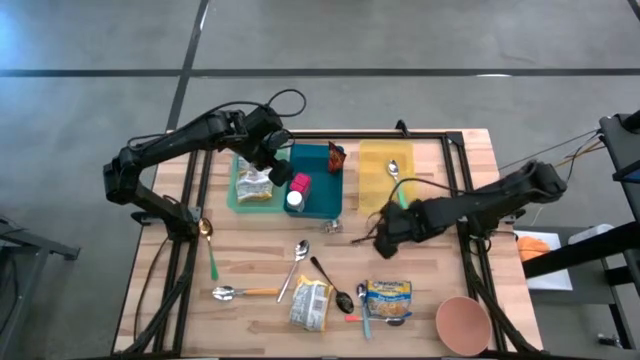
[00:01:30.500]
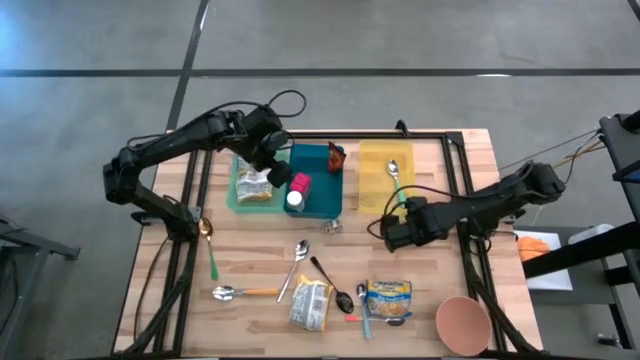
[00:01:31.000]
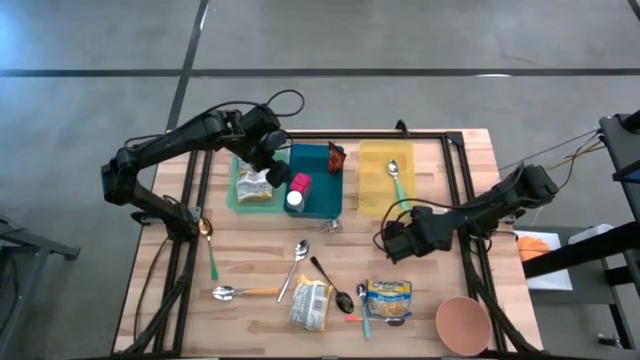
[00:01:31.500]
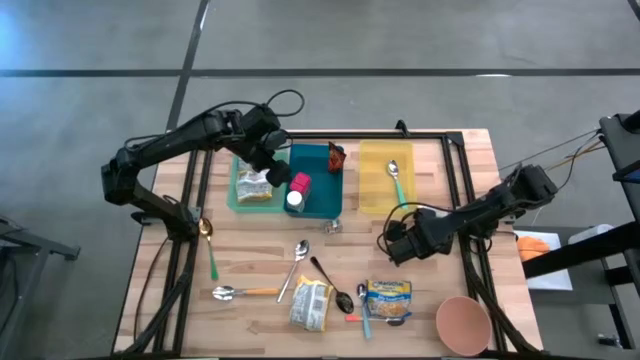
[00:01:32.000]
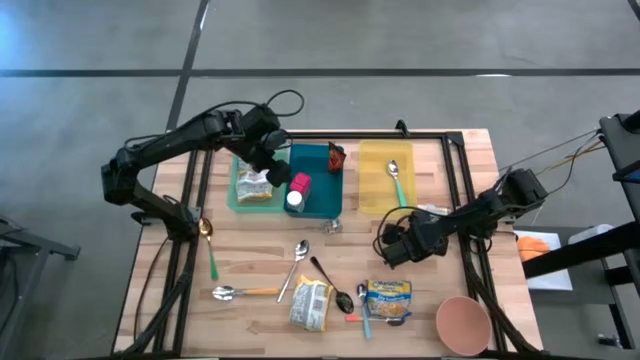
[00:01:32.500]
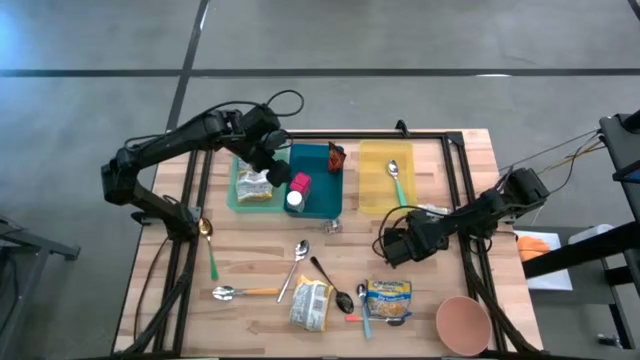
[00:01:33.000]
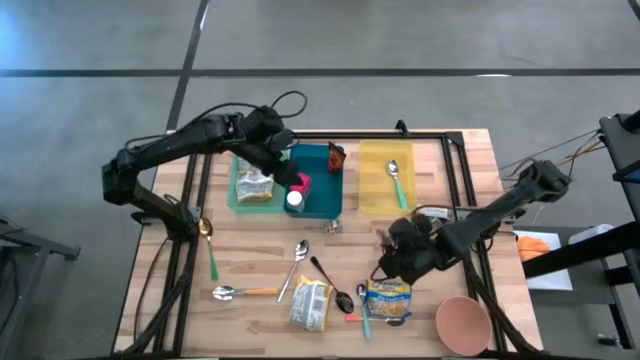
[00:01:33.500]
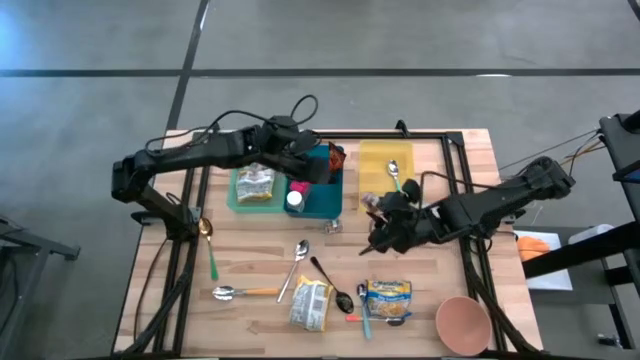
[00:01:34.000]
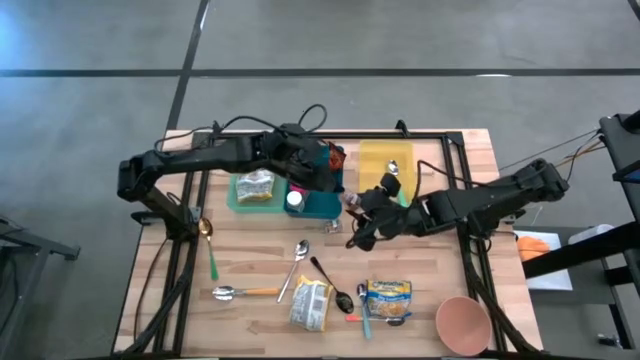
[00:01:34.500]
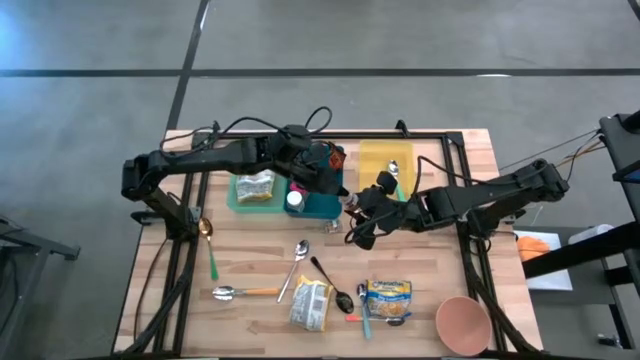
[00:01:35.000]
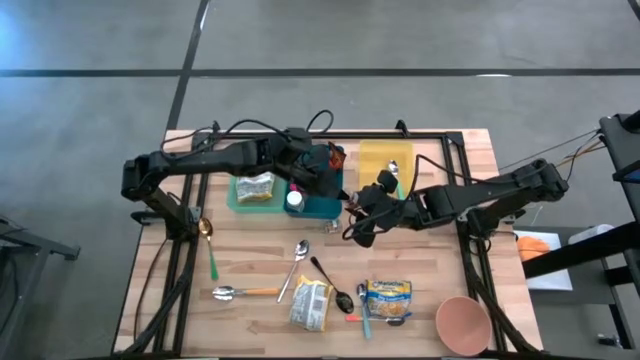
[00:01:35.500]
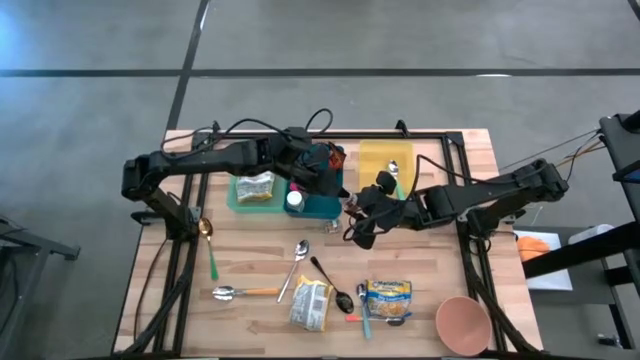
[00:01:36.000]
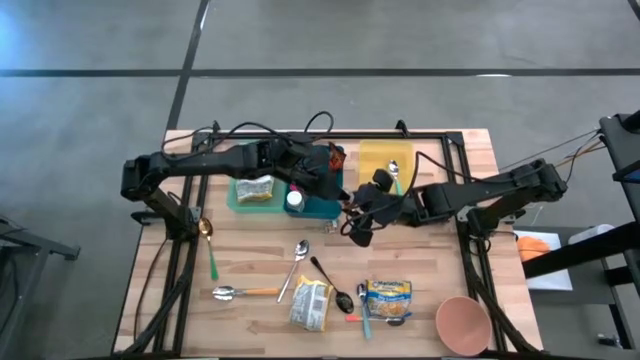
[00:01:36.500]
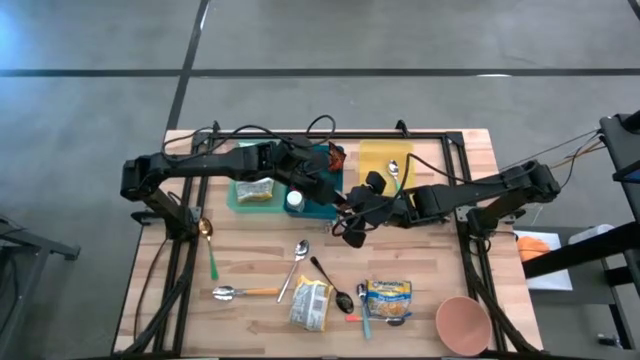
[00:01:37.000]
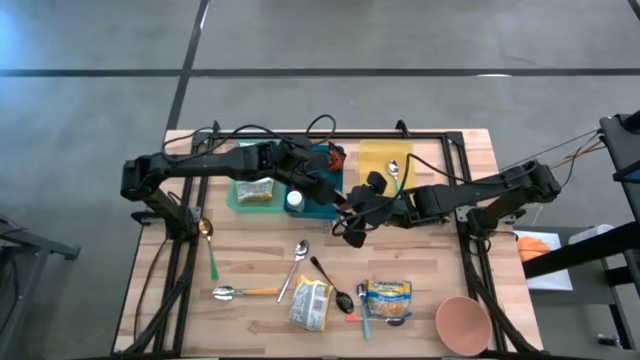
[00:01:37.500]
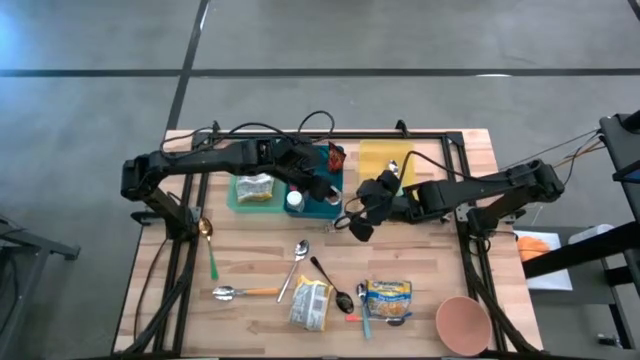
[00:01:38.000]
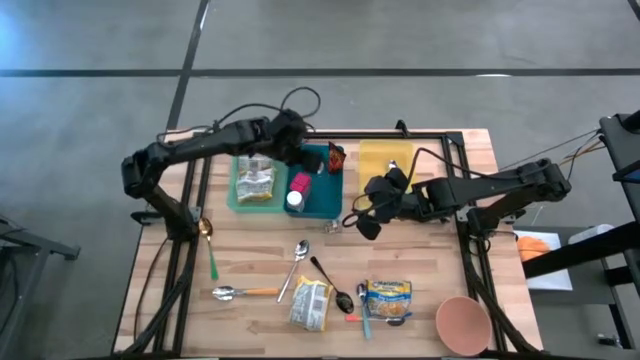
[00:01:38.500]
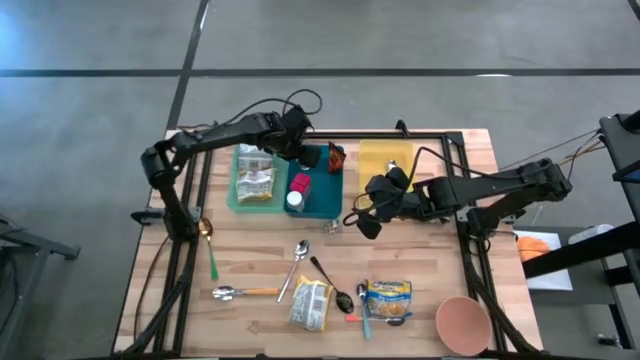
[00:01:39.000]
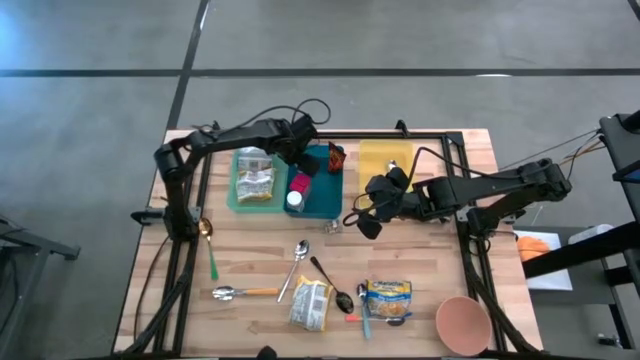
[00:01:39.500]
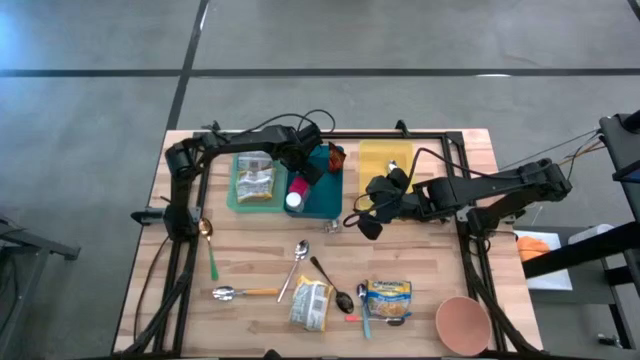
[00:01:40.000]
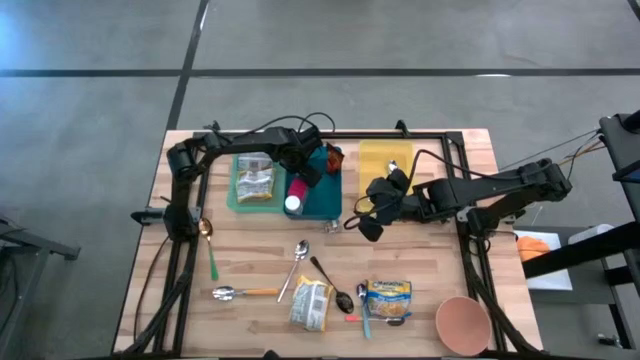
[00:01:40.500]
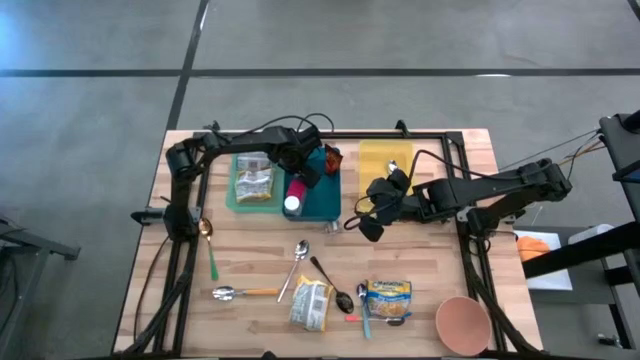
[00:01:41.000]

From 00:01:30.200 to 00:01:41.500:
Put the right brown seasoning bottle into the blue bin

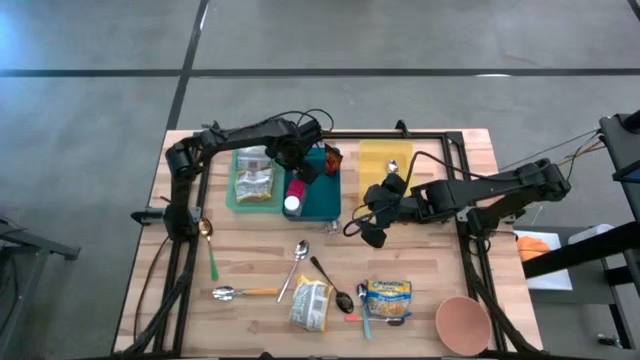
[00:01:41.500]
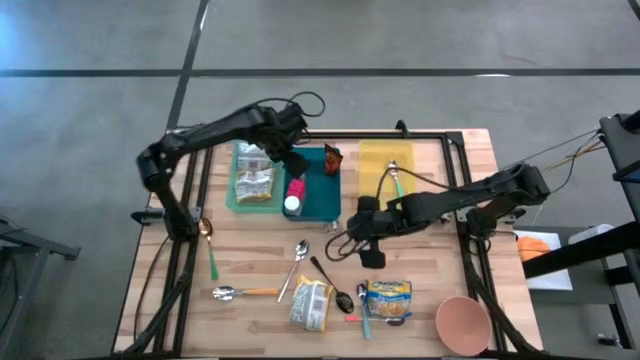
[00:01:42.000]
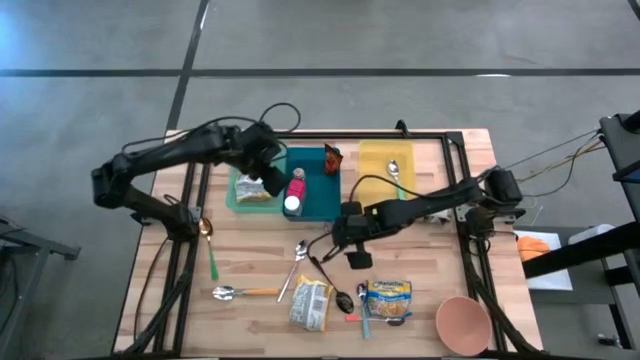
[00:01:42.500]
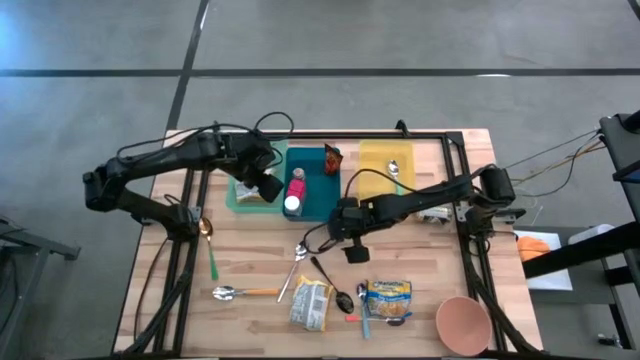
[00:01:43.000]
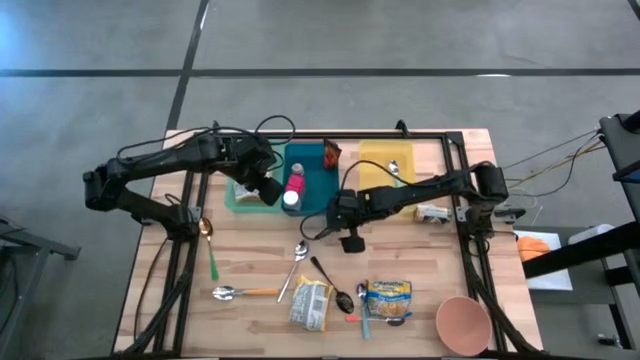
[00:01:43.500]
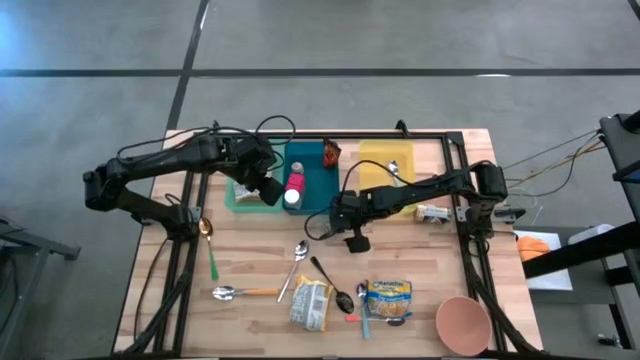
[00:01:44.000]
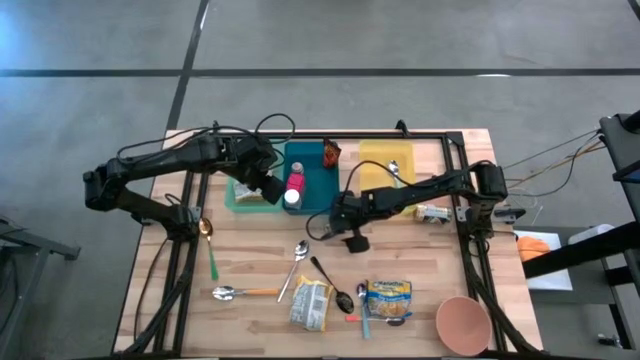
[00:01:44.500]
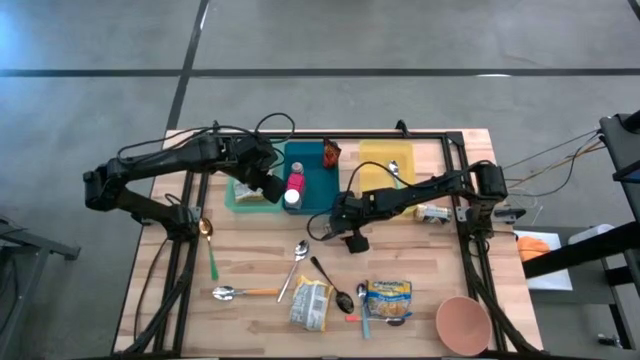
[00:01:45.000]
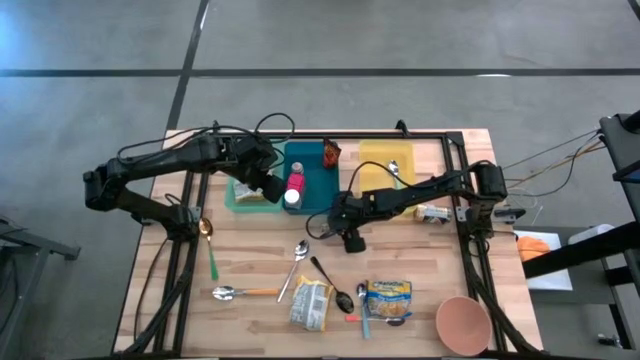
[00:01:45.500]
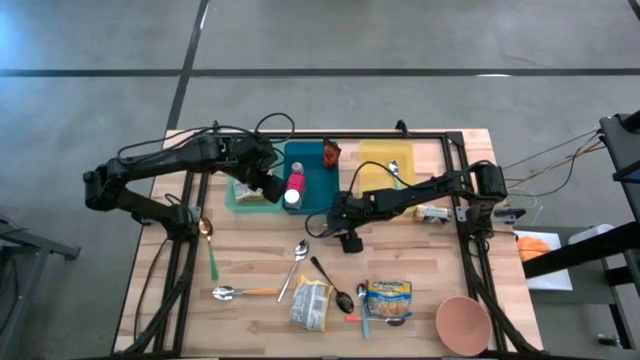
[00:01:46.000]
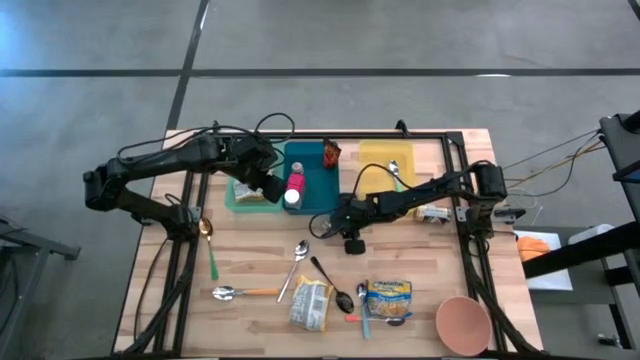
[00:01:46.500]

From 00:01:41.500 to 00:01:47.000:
Put the brown seasoning bottle into the blue bin
